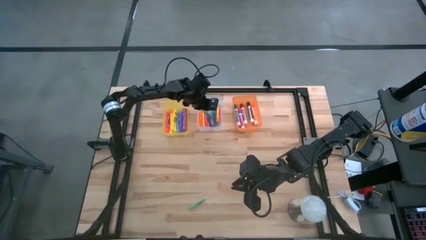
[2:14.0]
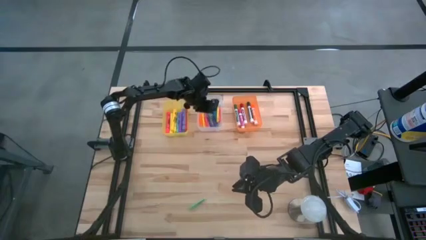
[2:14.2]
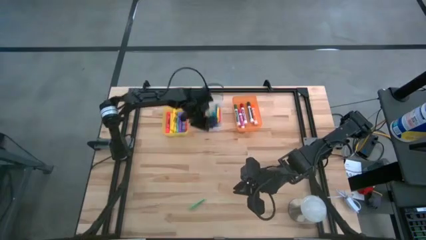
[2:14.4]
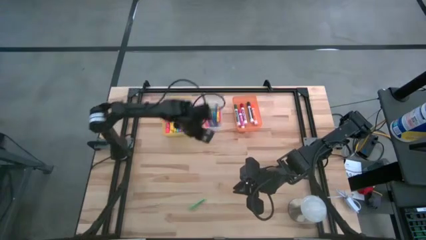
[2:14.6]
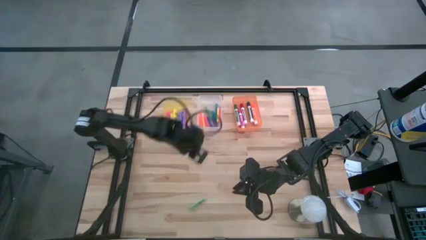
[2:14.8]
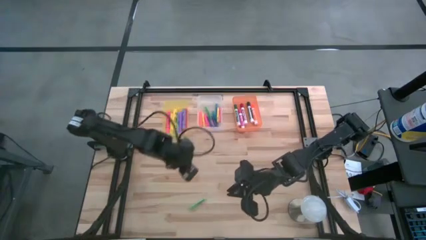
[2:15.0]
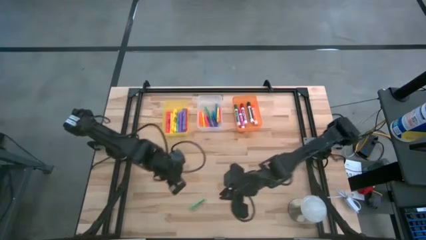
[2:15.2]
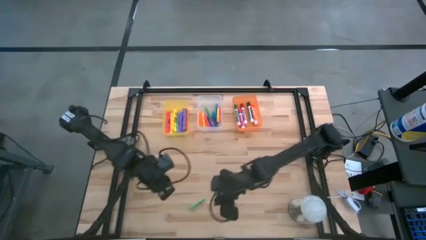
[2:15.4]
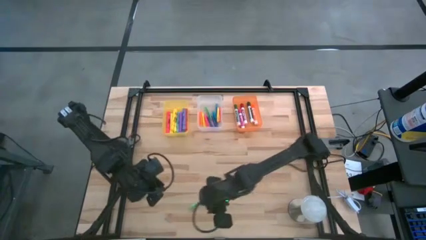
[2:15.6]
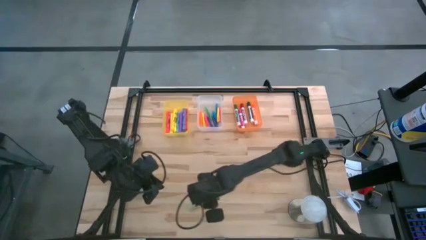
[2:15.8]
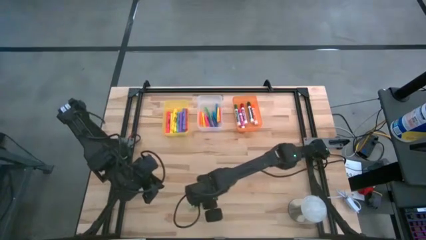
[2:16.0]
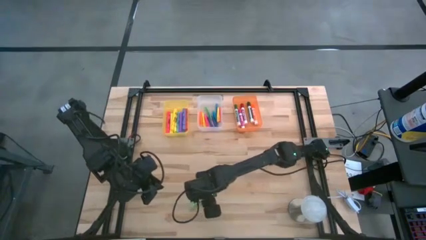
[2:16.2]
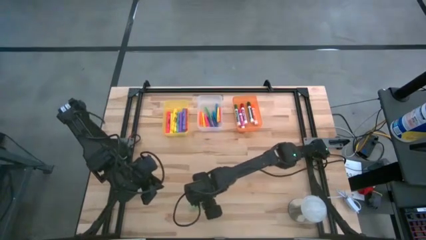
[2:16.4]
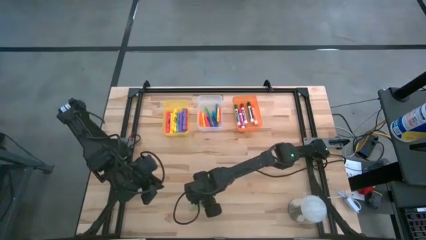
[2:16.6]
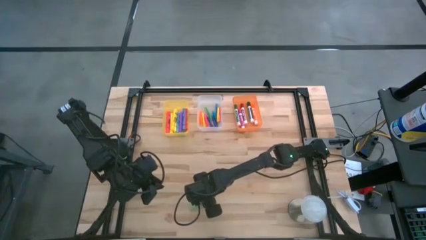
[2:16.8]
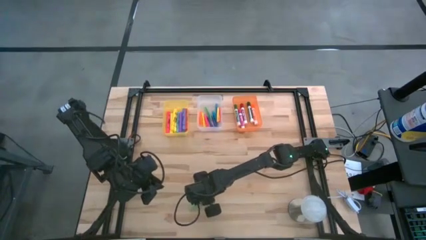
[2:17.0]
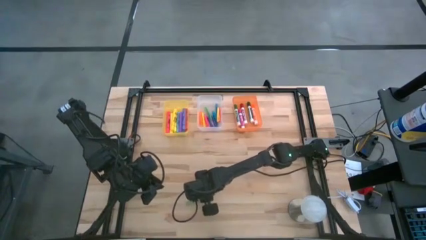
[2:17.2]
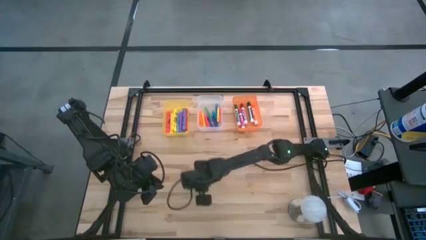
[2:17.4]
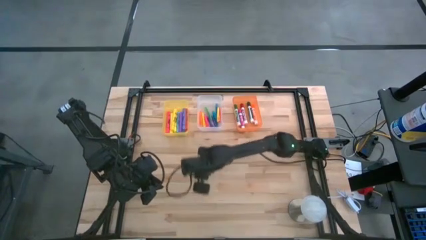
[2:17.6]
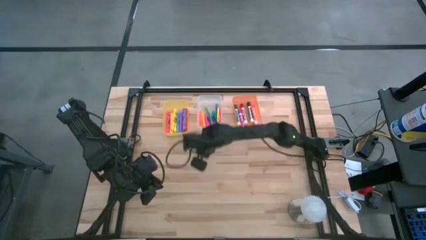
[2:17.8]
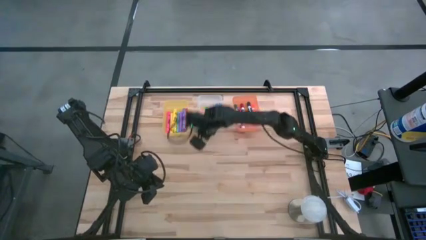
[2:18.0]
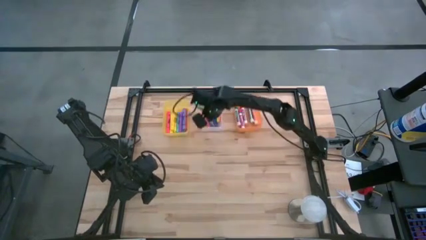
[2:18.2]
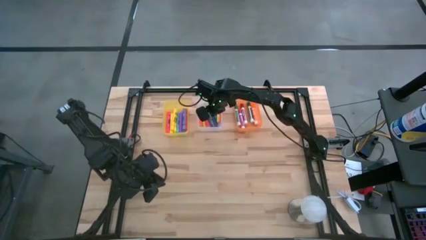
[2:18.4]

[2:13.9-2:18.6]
Task: Pick & Place Markers
Put the green pen into the white bin

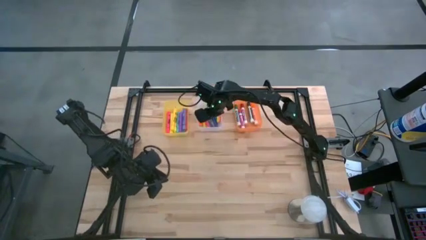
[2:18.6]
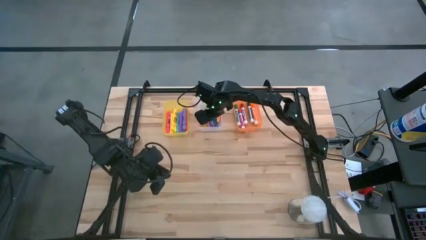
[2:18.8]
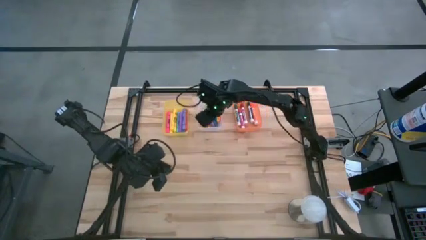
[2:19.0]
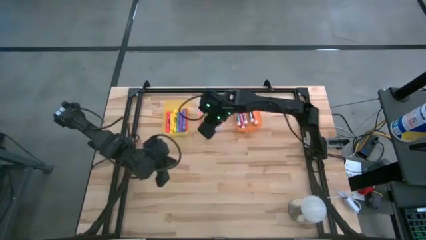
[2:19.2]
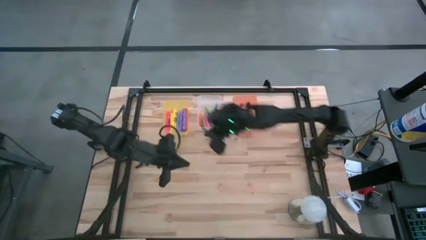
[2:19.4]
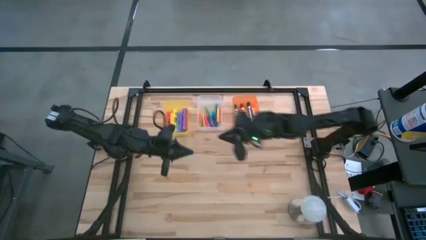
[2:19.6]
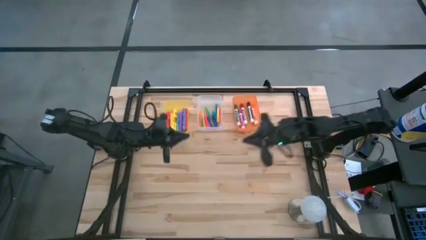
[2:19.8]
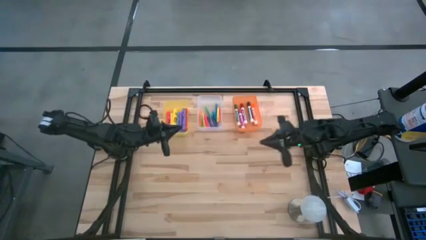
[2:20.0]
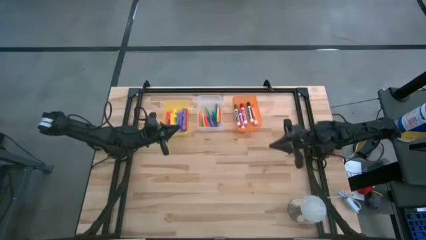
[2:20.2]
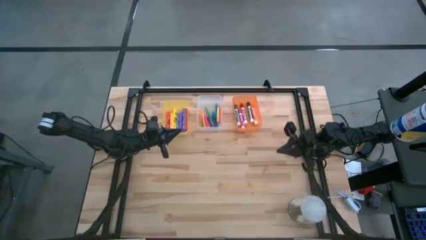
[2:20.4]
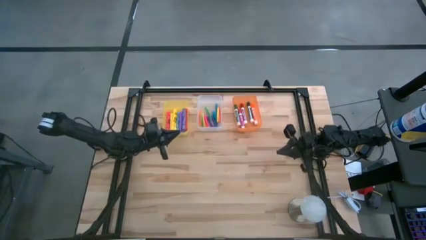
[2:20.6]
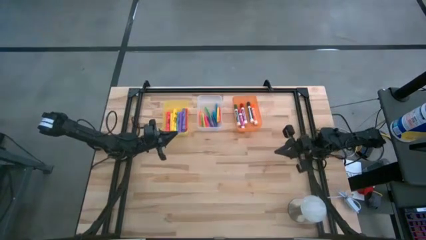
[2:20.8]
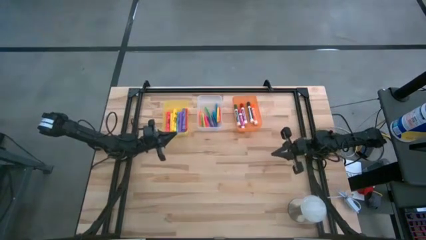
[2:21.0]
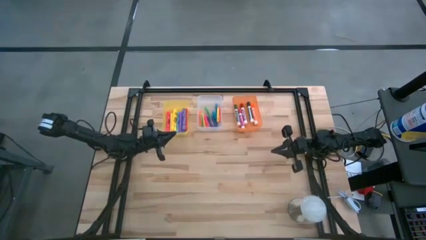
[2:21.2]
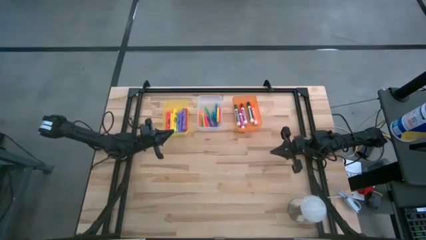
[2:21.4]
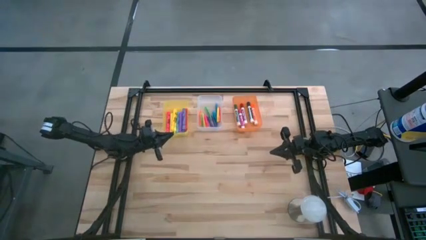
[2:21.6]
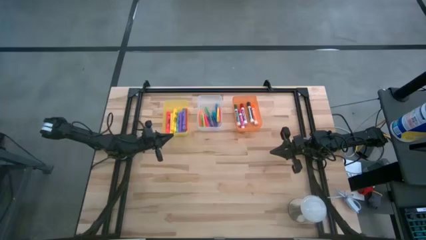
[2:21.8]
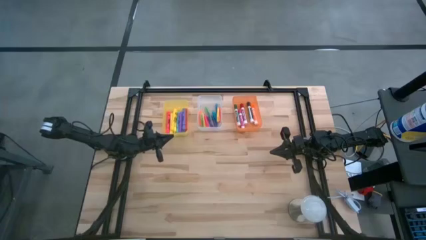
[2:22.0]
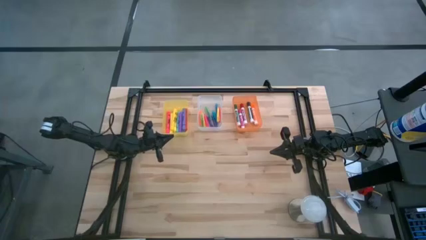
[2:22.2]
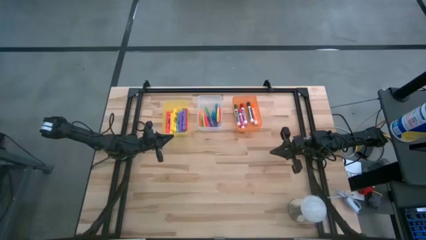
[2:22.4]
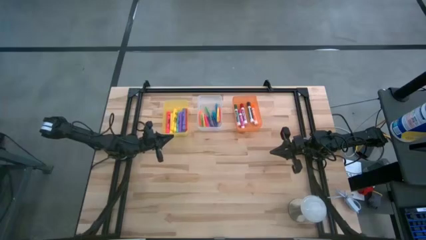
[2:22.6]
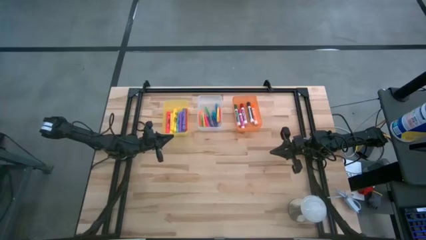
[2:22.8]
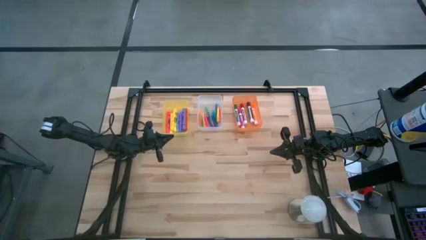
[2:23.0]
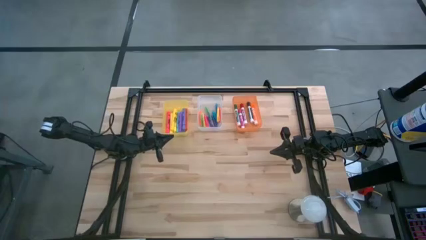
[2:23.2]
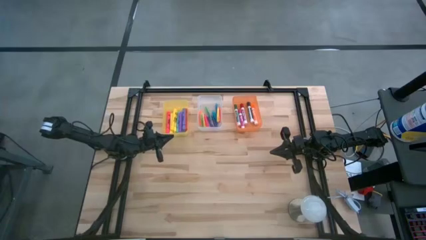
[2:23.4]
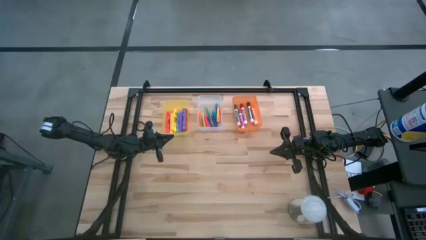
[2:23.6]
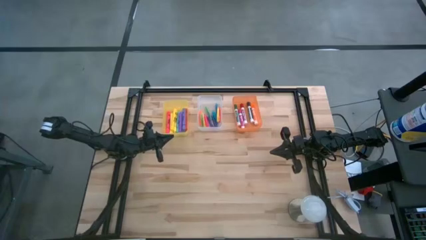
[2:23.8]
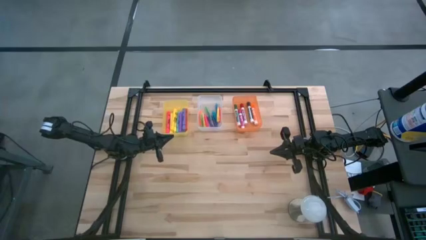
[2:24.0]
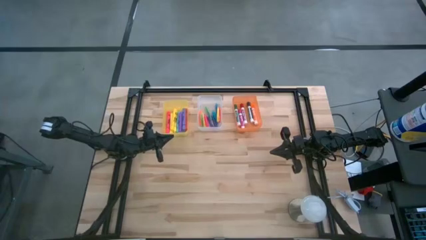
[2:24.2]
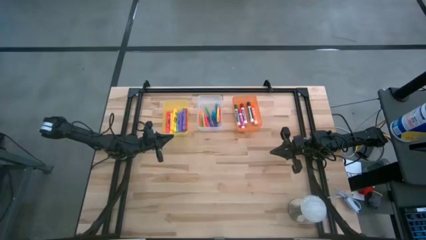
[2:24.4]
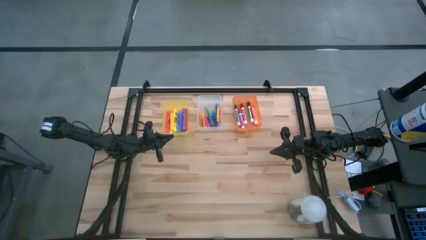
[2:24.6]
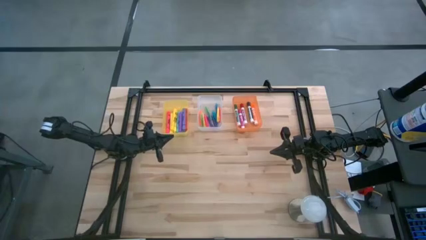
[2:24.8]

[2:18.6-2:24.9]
Return to Home Position

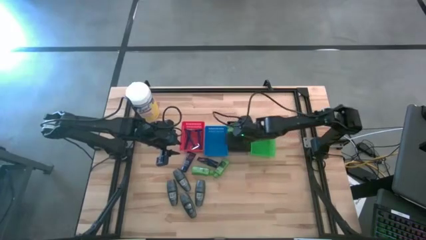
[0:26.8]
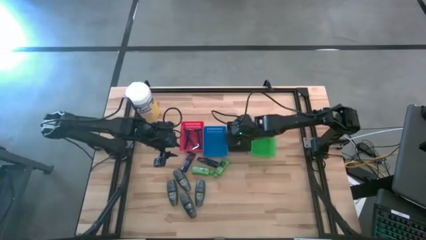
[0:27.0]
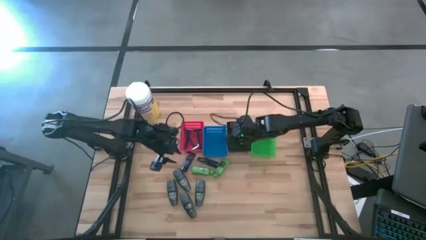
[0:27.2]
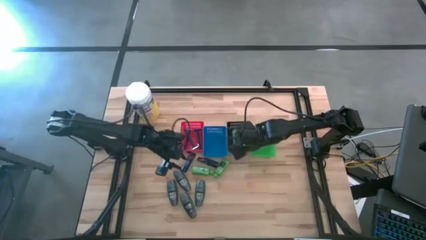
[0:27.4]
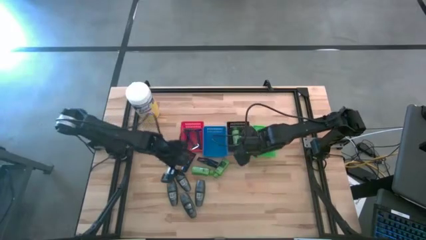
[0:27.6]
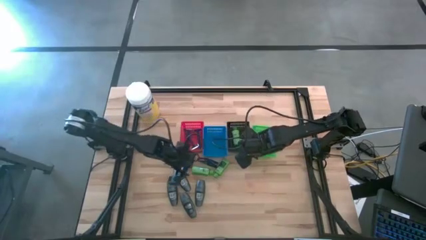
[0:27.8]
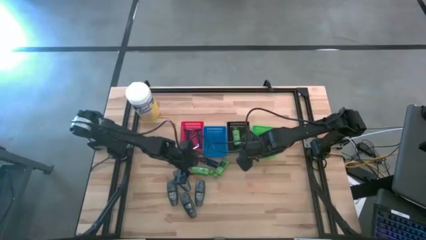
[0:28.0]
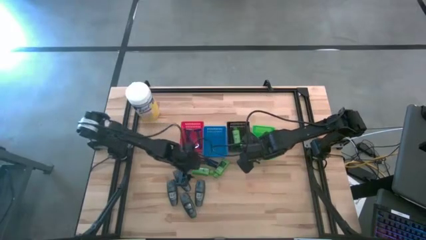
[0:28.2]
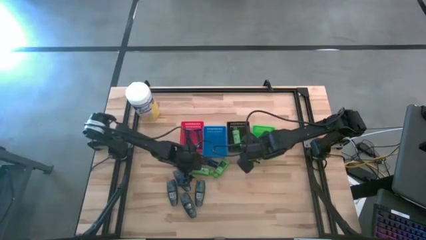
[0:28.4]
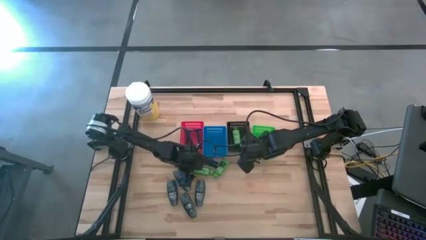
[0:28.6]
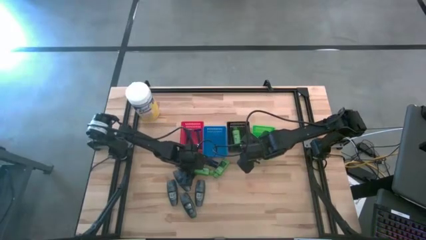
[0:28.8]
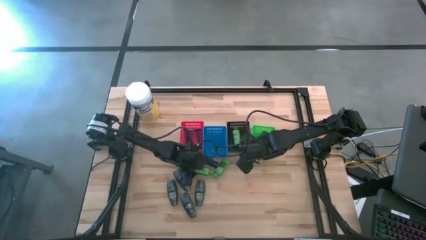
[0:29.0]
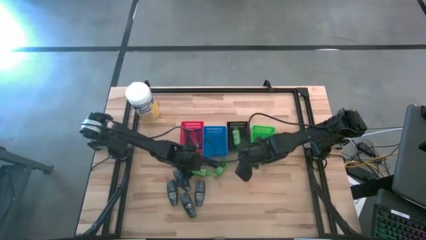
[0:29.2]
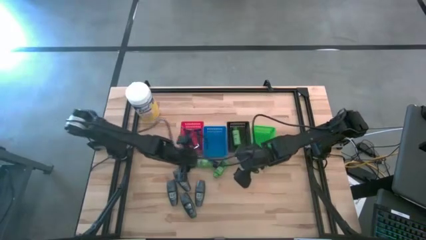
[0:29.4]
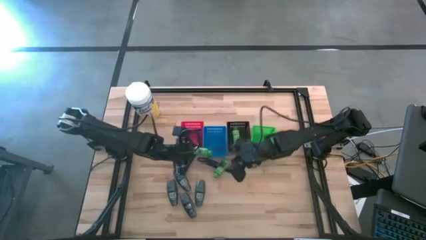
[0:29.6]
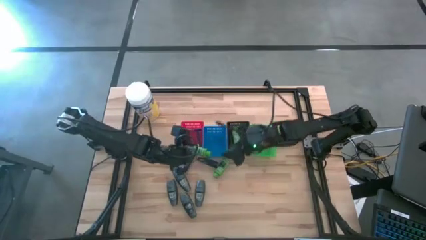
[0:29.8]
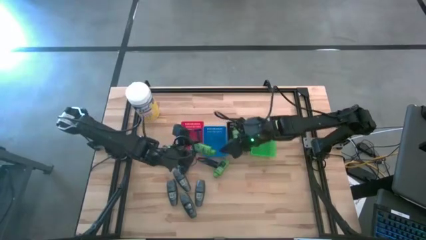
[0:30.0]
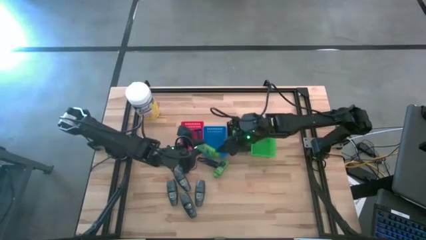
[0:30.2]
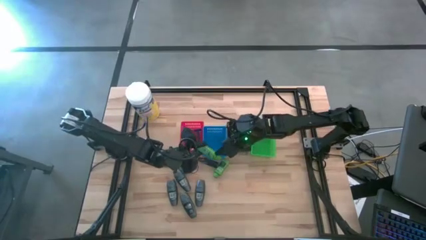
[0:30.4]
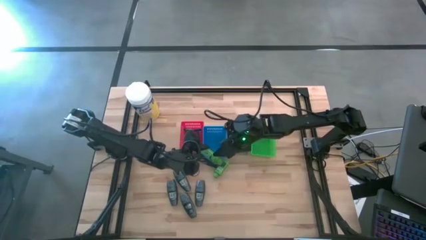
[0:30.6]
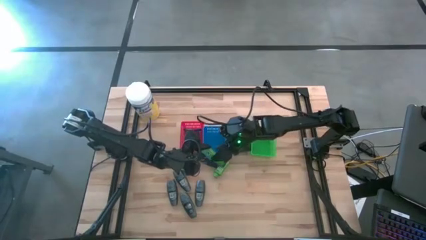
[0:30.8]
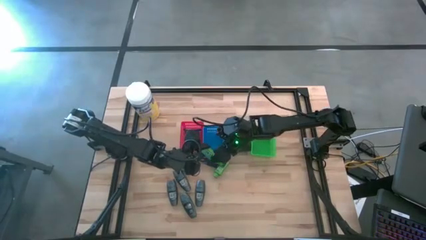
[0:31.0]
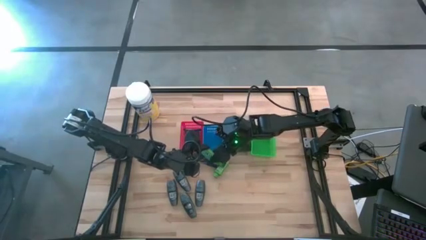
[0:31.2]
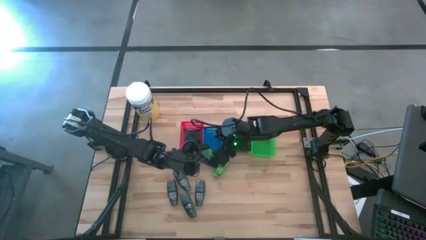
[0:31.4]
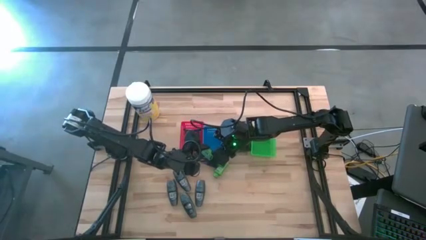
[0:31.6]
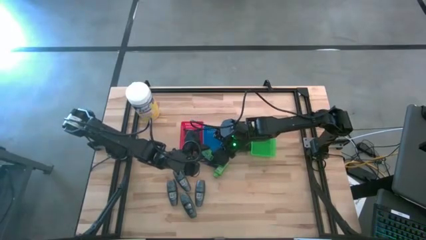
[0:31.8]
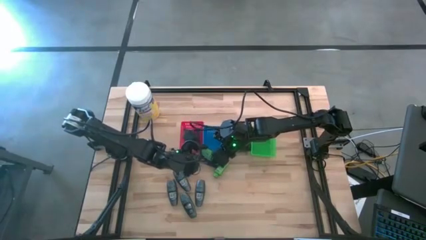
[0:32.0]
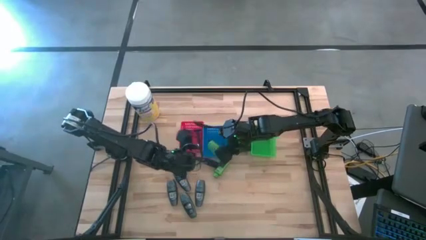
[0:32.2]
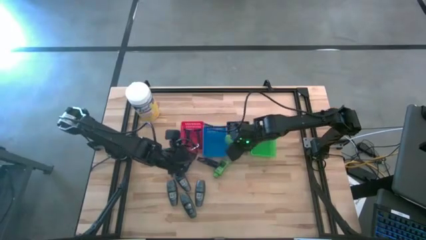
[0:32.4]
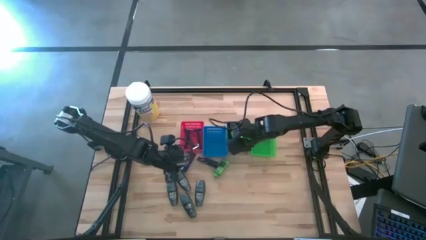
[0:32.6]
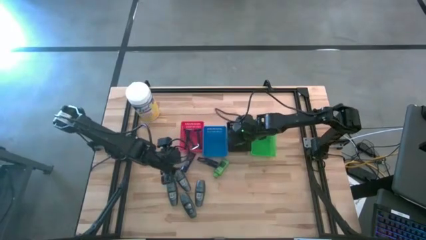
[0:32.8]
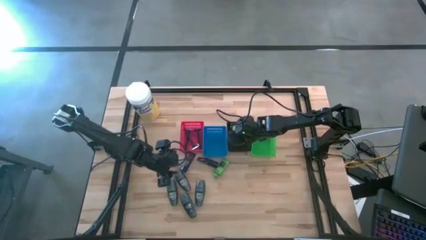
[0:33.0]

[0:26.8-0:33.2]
Task: Pick & Place Travel size toiletries
Put the shampoo into the black basket
